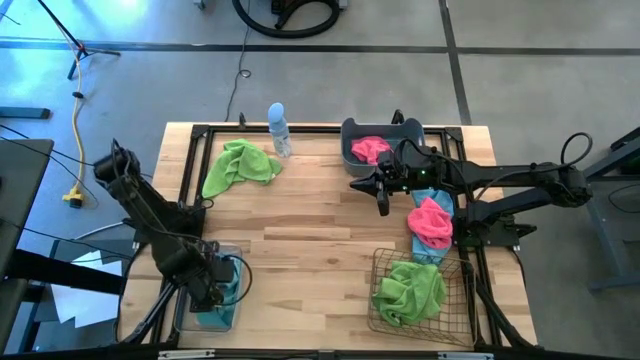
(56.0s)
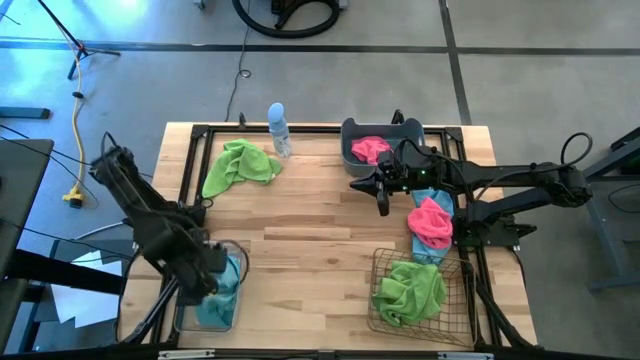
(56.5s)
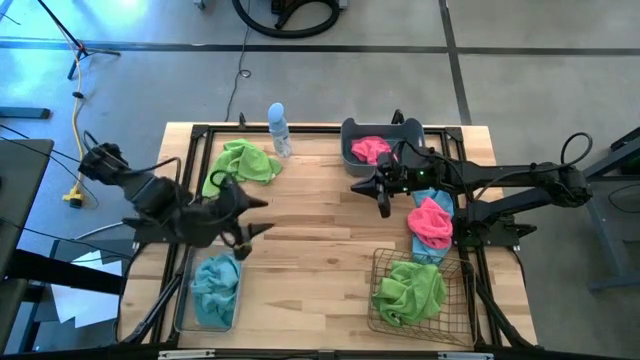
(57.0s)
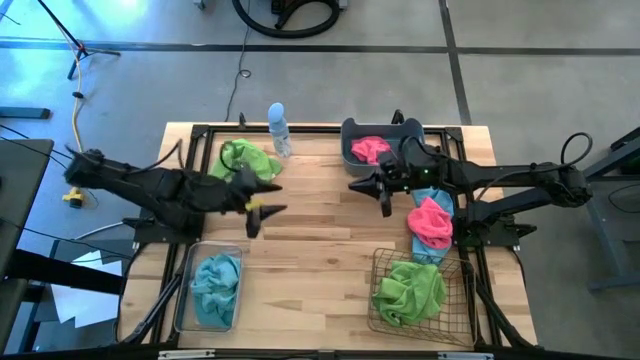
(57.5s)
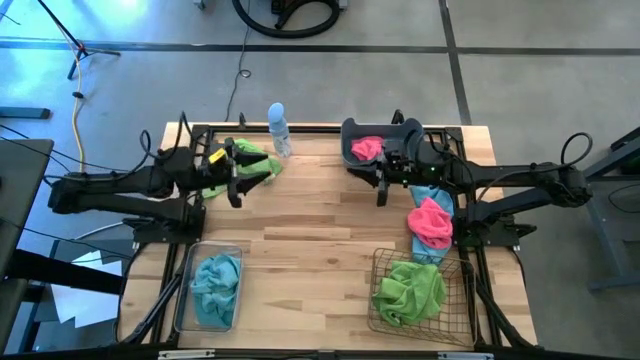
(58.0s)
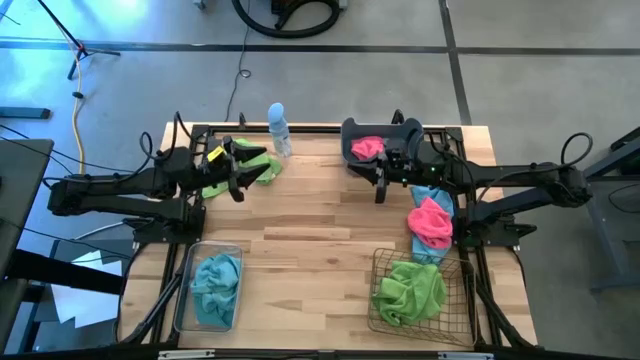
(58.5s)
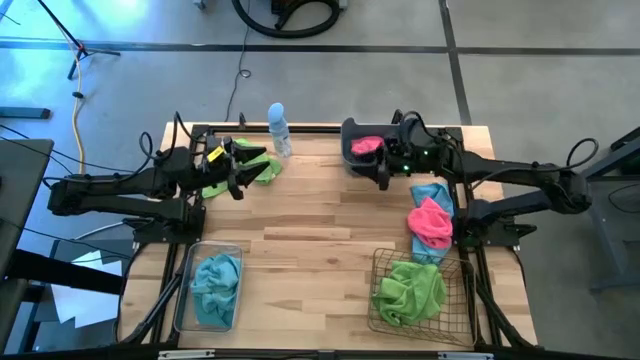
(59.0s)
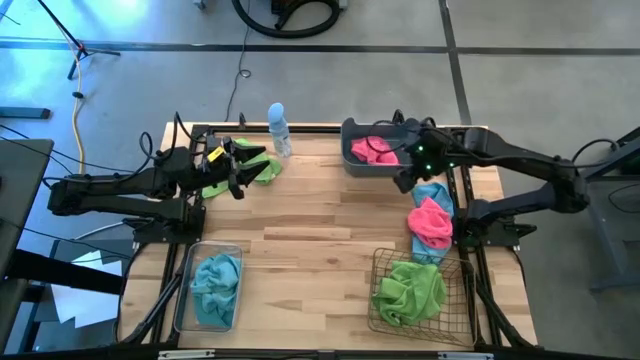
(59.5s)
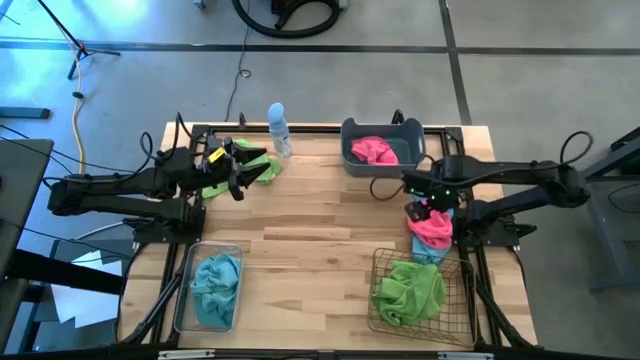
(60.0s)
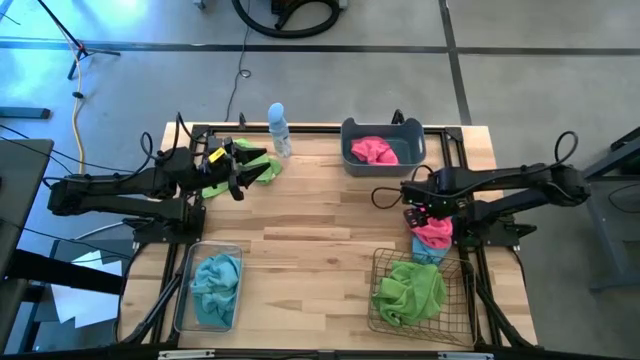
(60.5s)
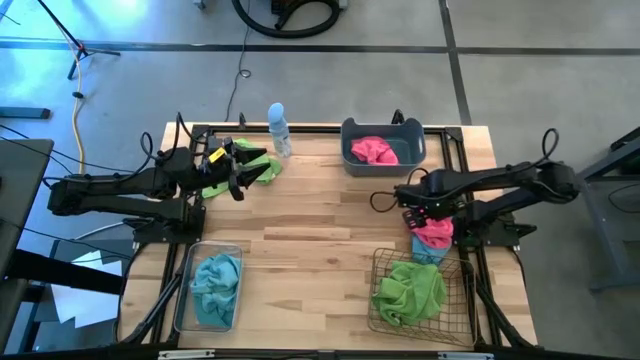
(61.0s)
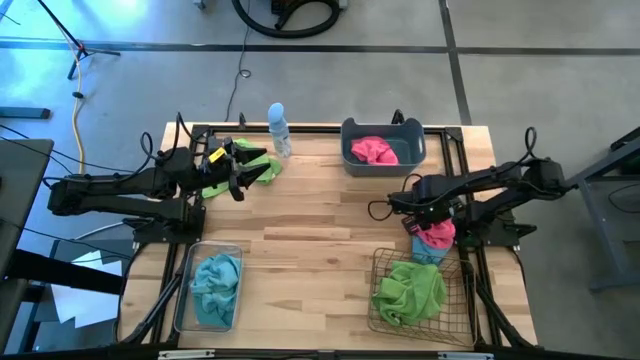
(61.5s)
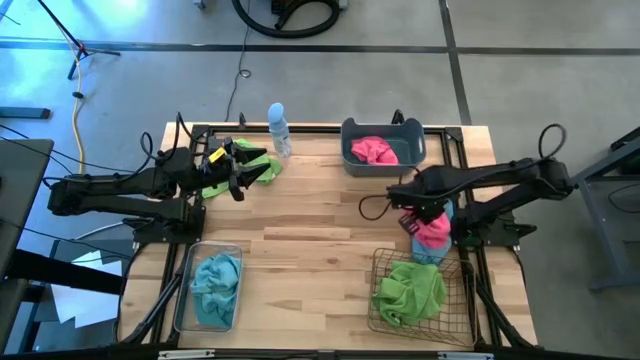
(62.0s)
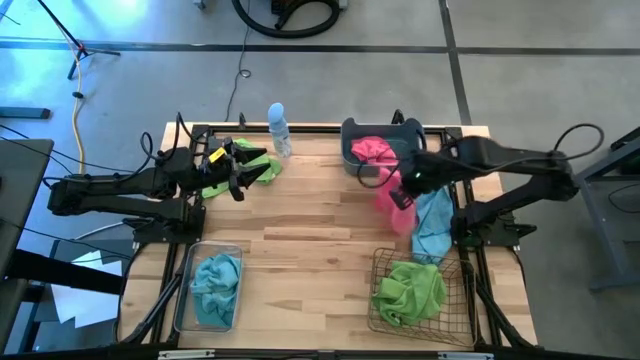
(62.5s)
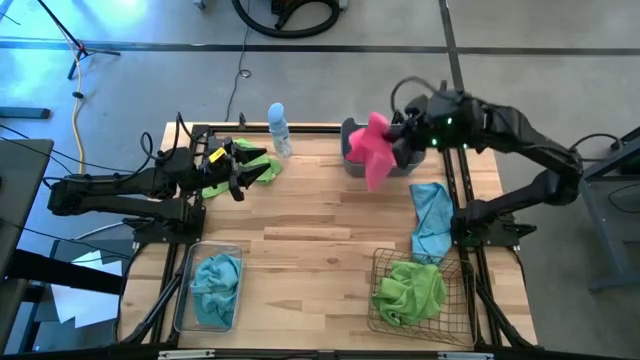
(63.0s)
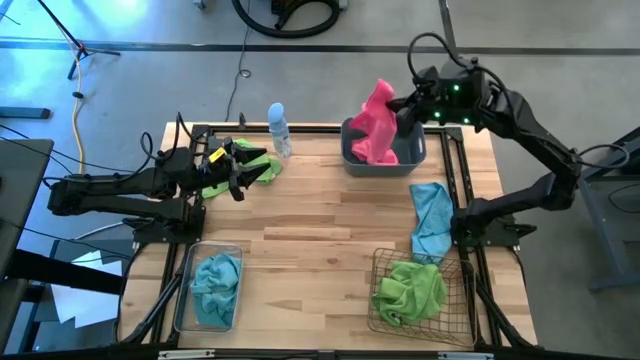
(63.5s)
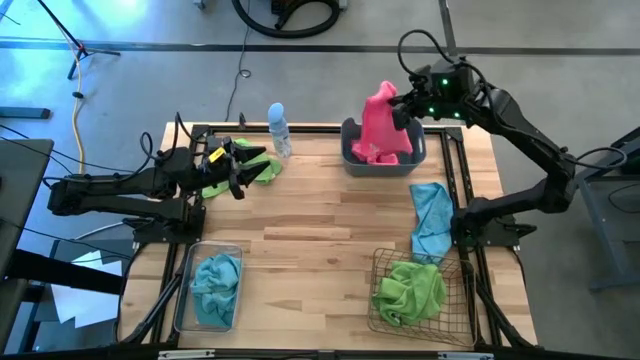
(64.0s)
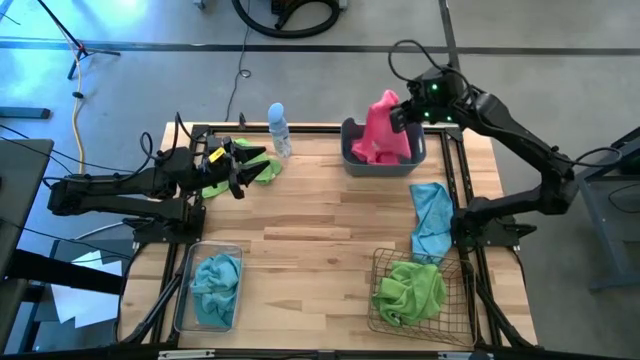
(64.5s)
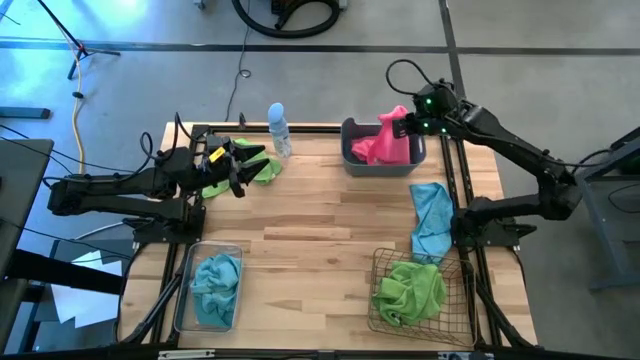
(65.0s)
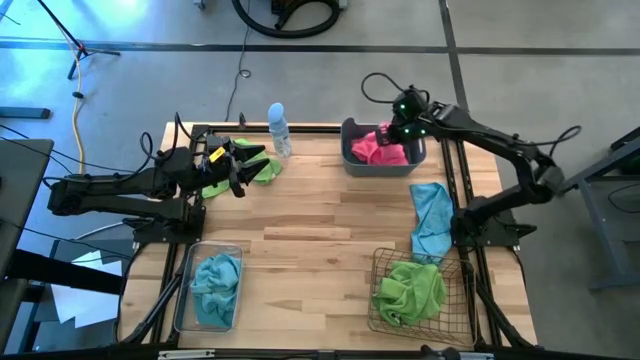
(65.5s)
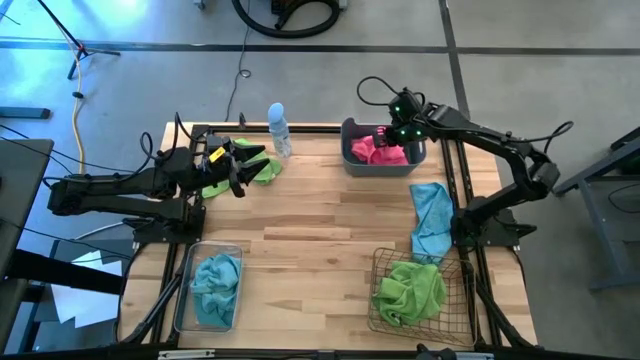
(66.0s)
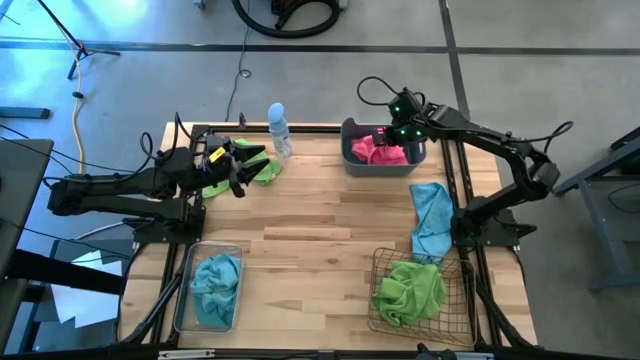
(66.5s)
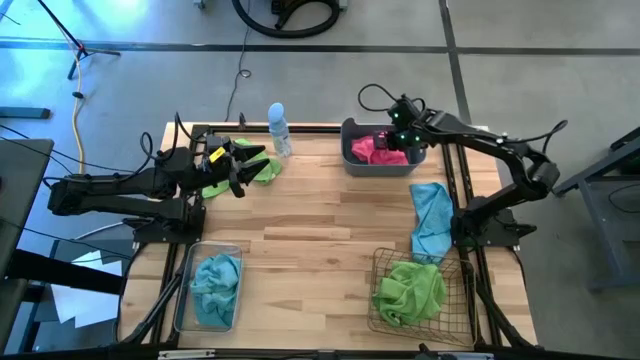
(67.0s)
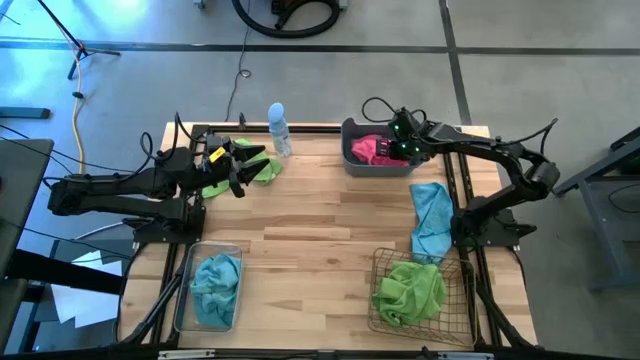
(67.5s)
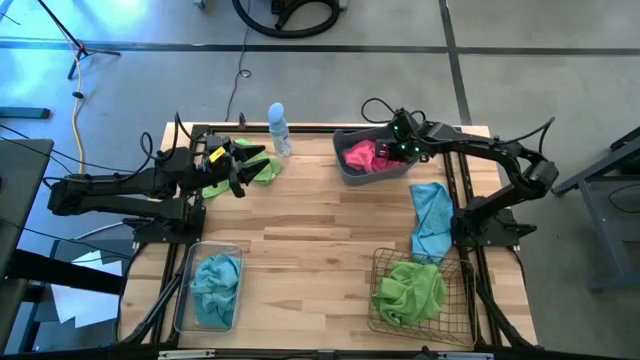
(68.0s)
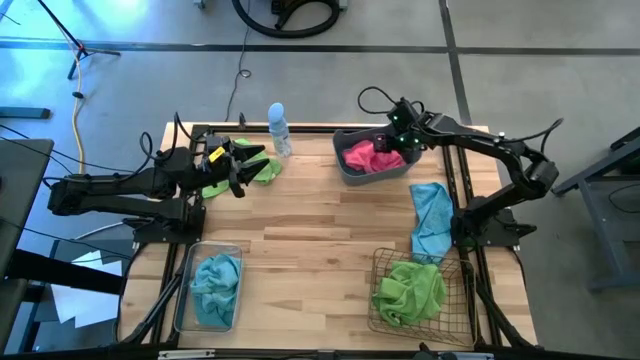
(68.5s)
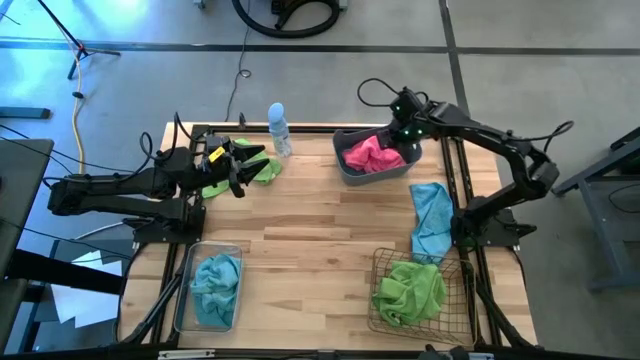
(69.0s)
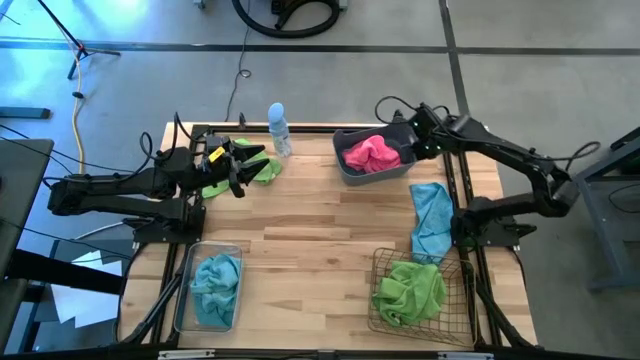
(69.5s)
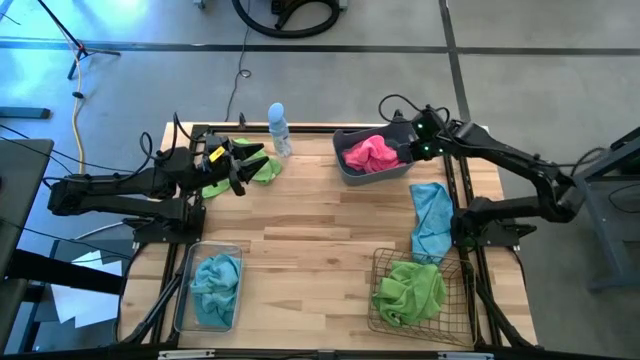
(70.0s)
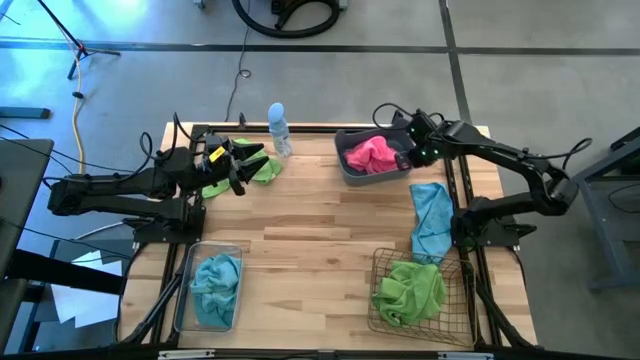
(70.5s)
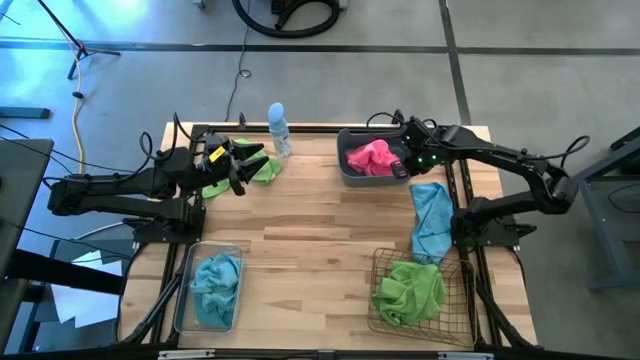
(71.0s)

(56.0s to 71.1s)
Task: Sort microfiber towel by color & place in baskets
Put the pink microfiber towel into the gray bin

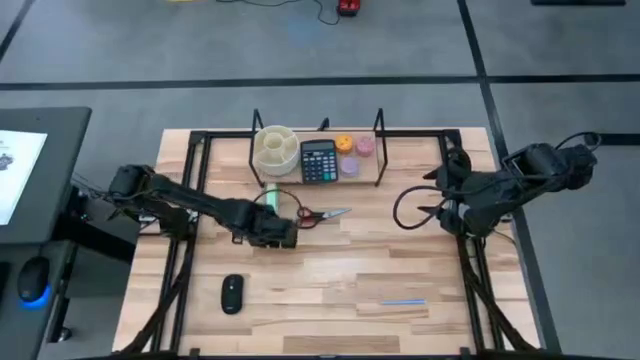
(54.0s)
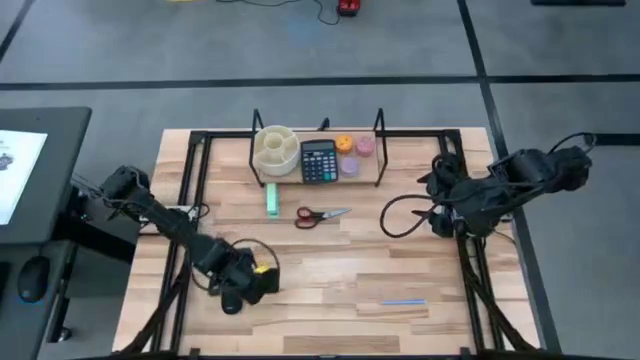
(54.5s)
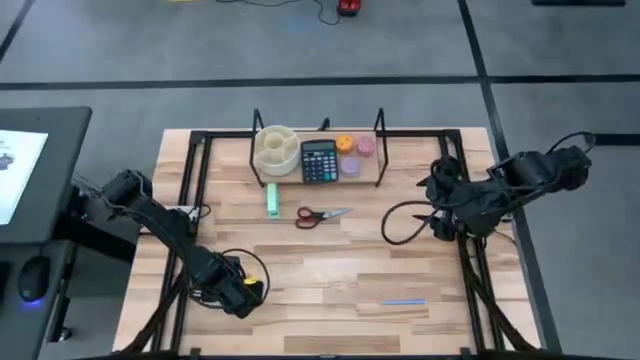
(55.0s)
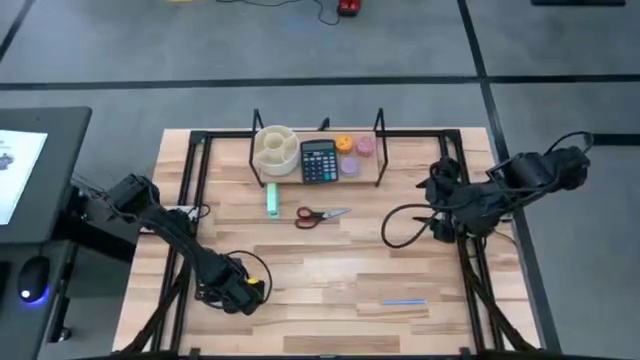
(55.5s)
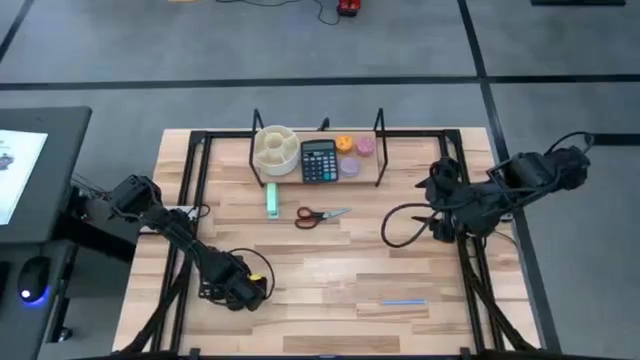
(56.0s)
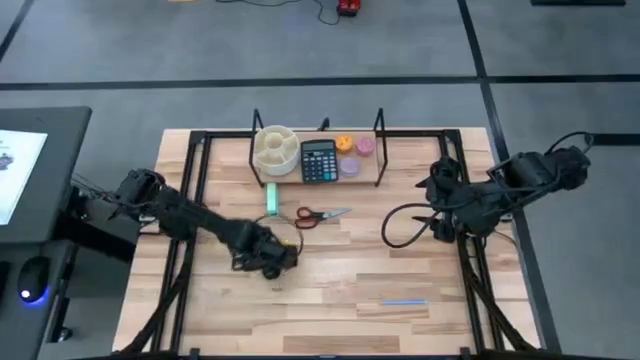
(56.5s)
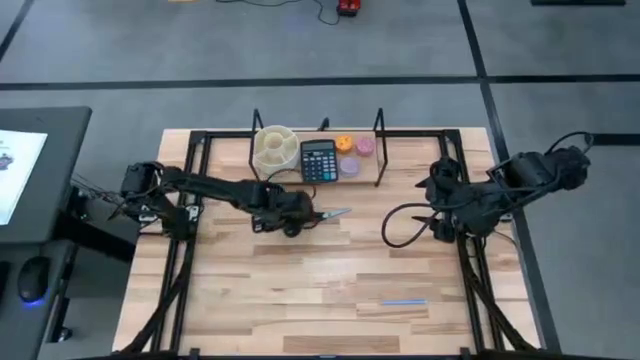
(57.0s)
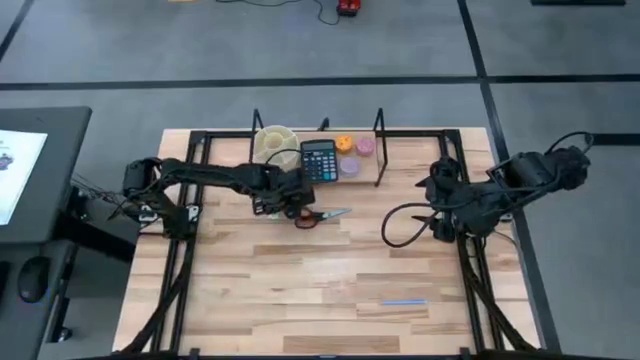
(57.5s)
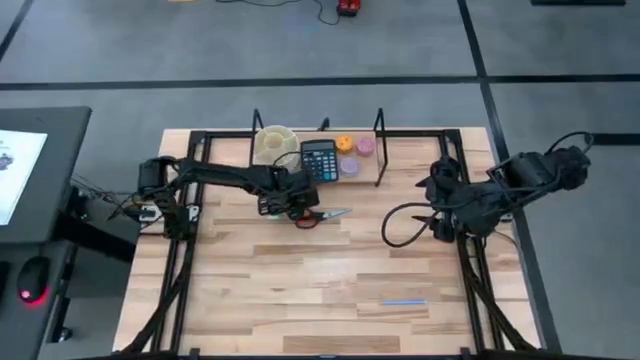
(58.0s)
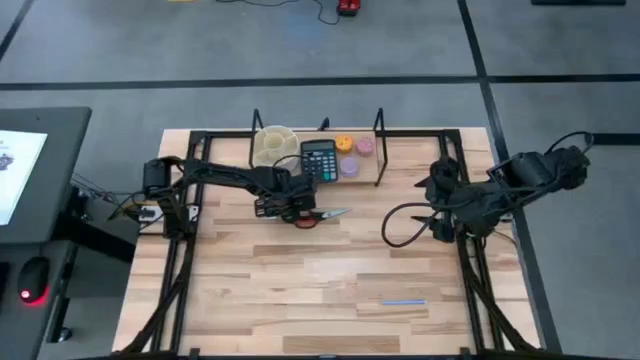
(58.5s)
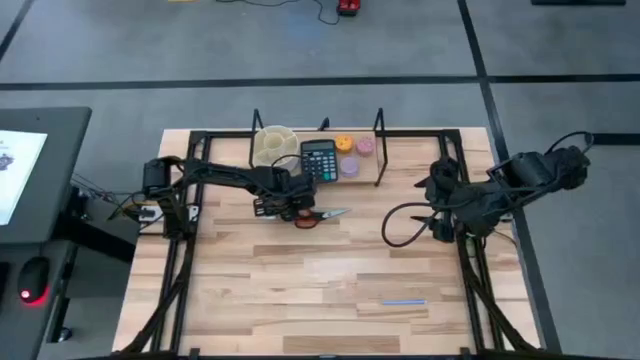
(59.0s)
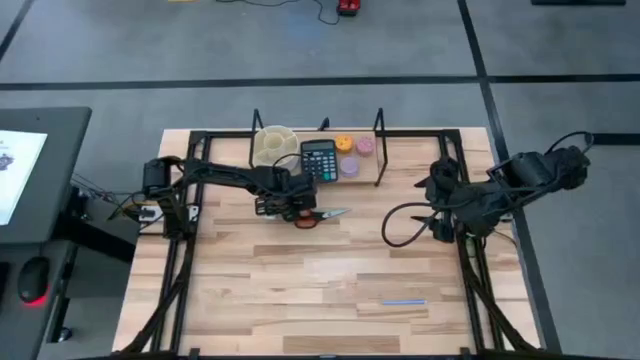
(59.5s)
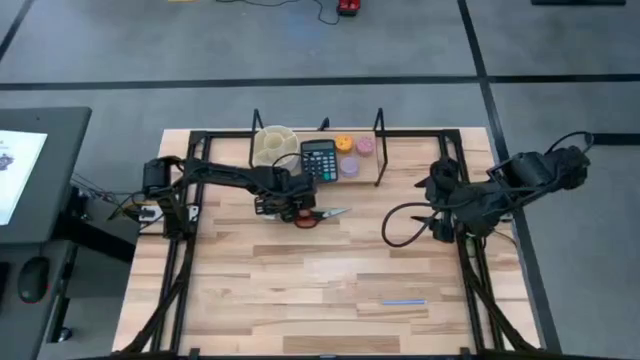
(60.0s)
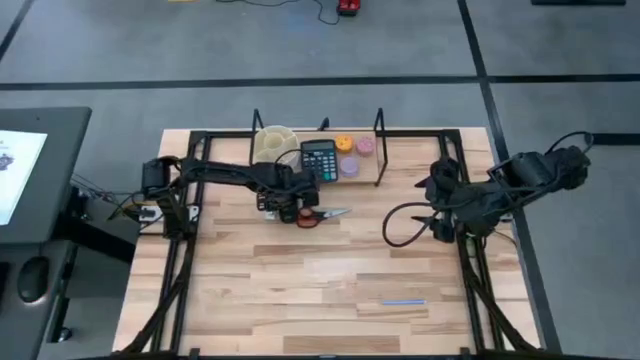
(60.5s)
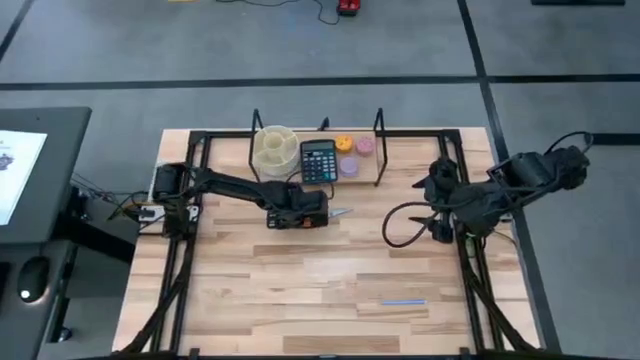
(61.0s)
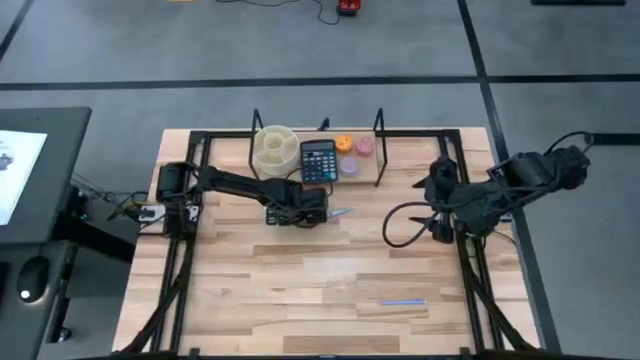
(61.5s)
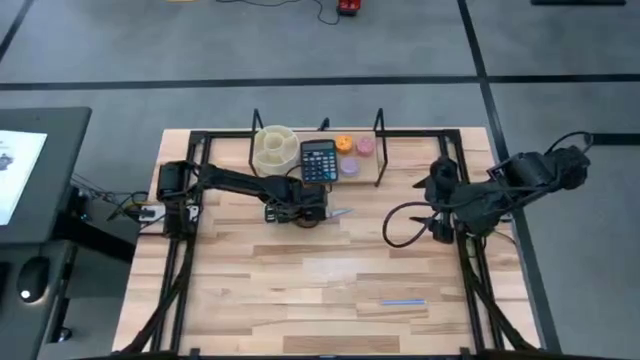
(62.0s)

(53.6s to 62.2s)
Task: Stock shelves
Put the black mouse to the bottom left of the shelf
